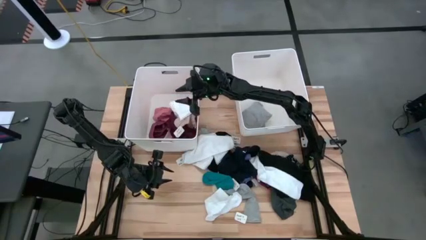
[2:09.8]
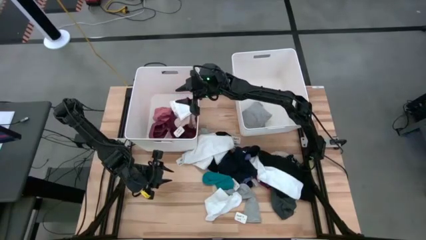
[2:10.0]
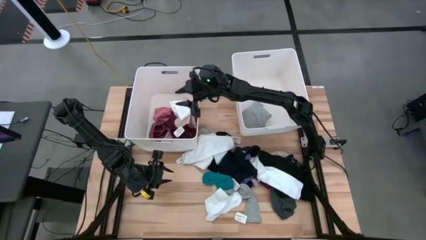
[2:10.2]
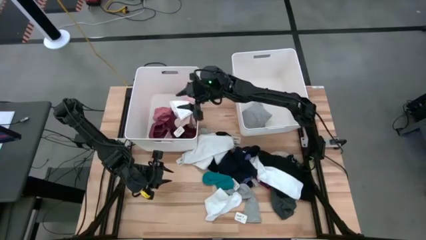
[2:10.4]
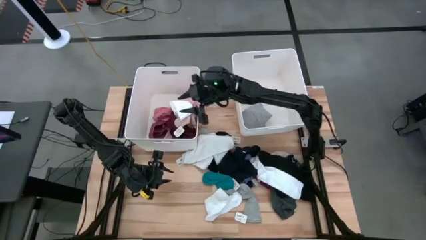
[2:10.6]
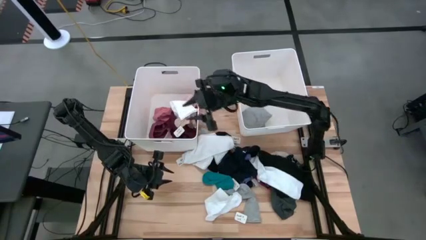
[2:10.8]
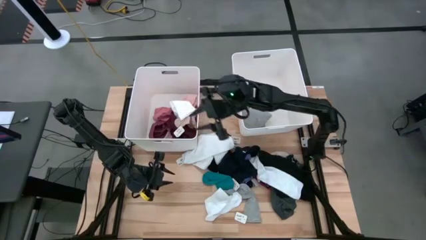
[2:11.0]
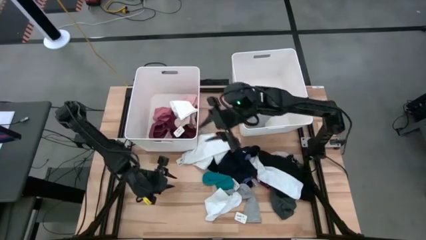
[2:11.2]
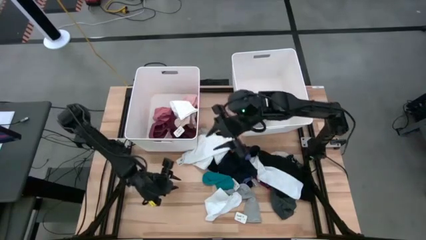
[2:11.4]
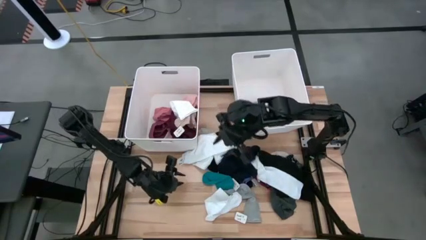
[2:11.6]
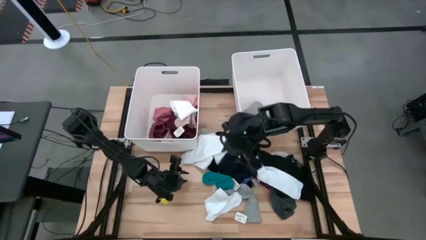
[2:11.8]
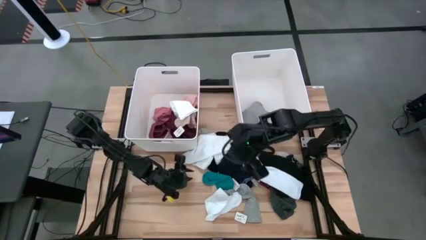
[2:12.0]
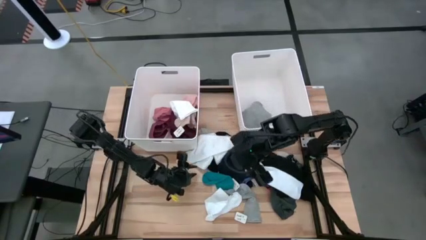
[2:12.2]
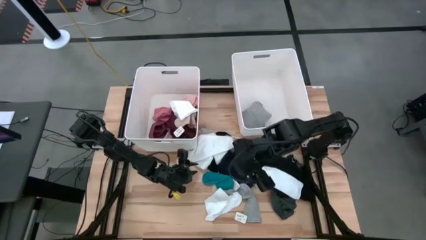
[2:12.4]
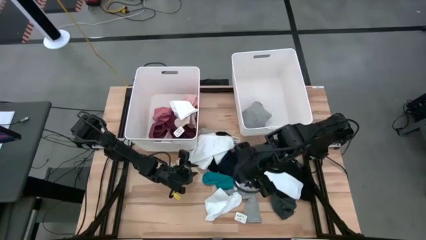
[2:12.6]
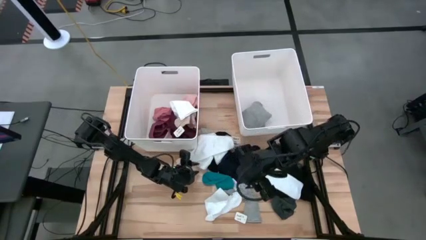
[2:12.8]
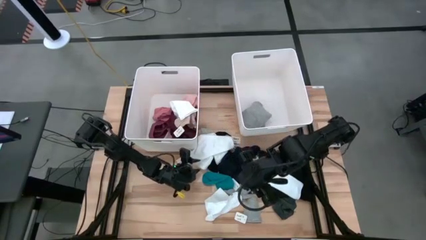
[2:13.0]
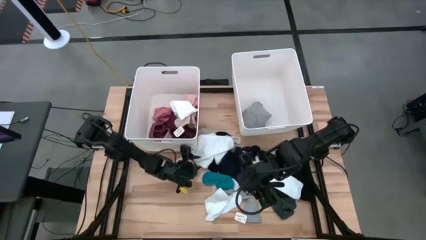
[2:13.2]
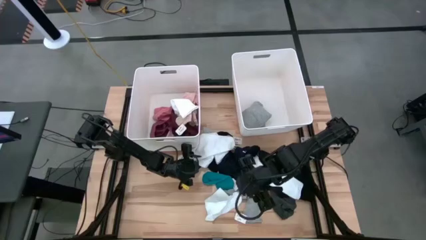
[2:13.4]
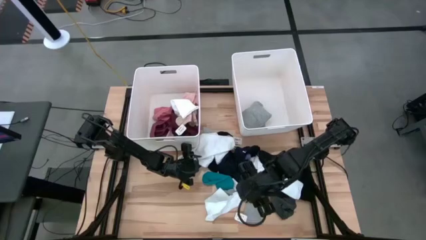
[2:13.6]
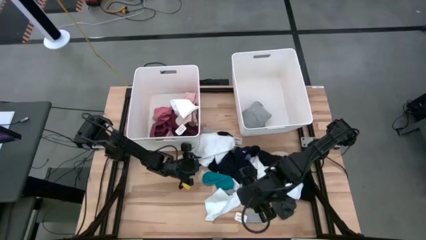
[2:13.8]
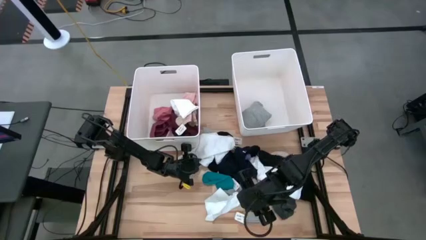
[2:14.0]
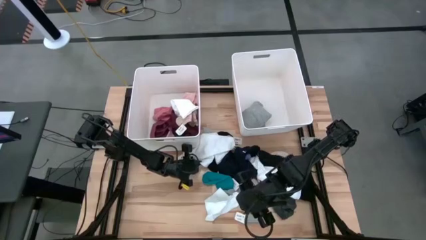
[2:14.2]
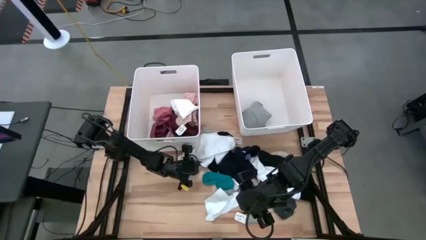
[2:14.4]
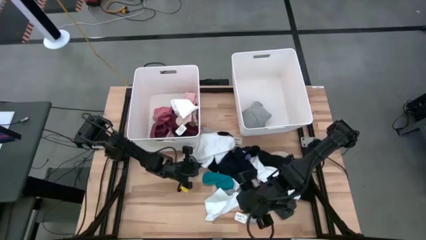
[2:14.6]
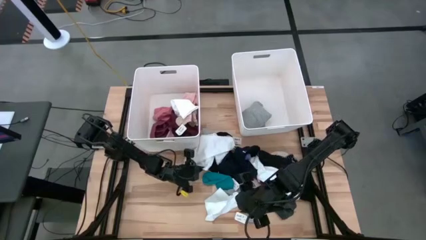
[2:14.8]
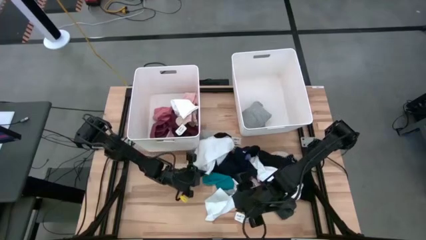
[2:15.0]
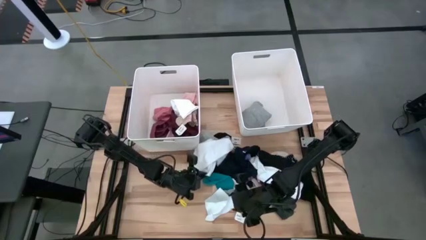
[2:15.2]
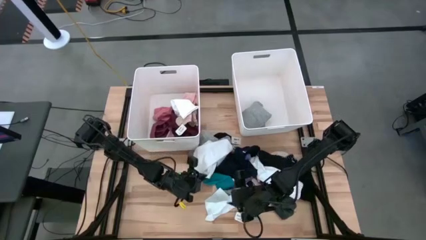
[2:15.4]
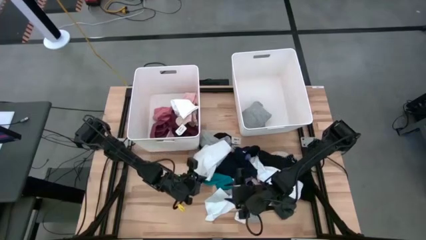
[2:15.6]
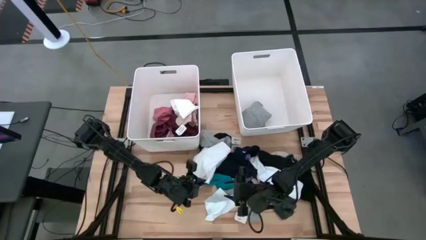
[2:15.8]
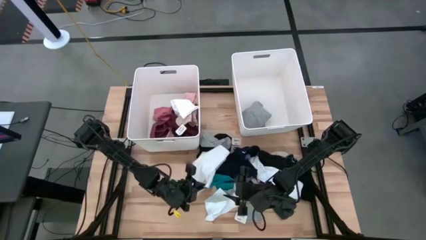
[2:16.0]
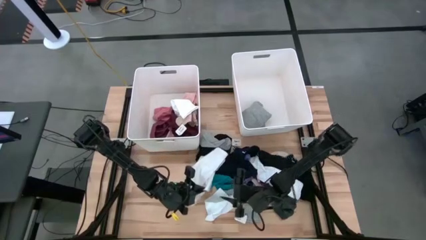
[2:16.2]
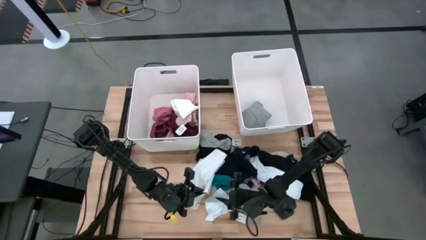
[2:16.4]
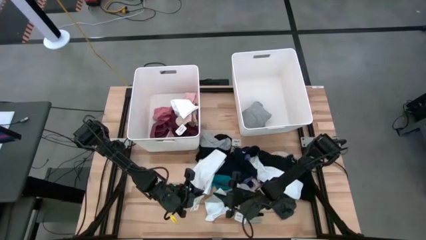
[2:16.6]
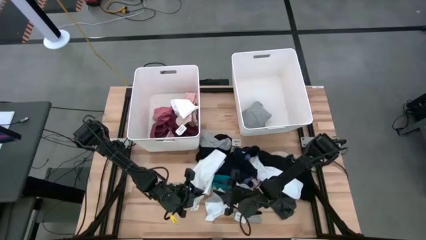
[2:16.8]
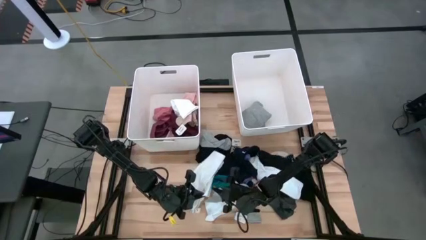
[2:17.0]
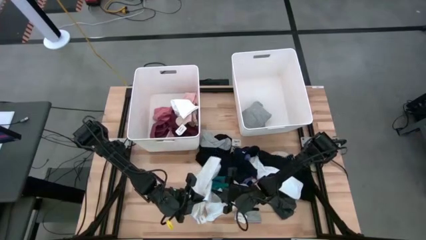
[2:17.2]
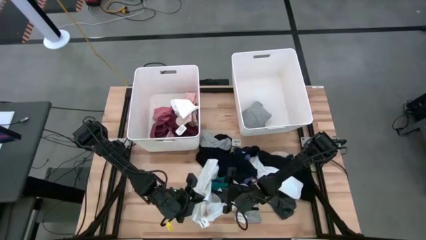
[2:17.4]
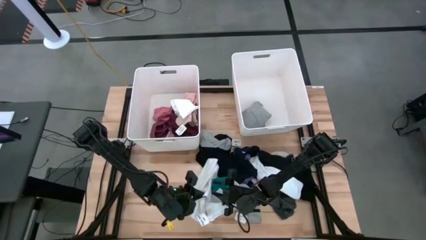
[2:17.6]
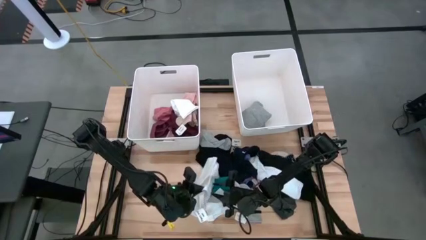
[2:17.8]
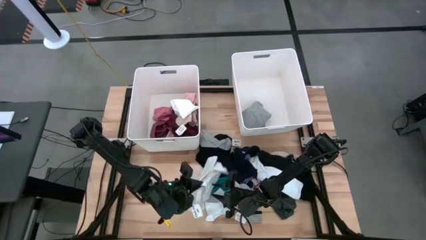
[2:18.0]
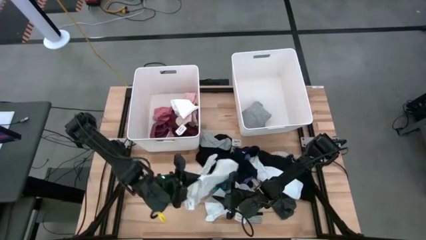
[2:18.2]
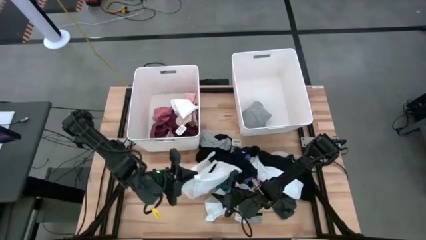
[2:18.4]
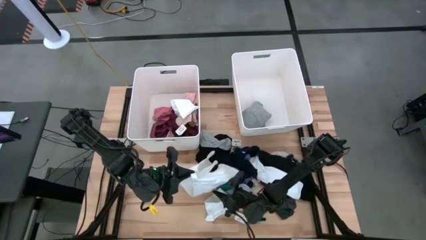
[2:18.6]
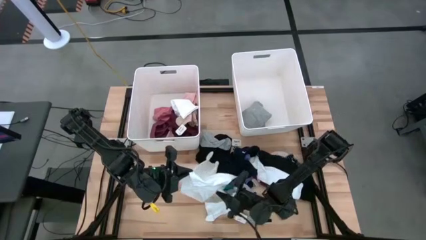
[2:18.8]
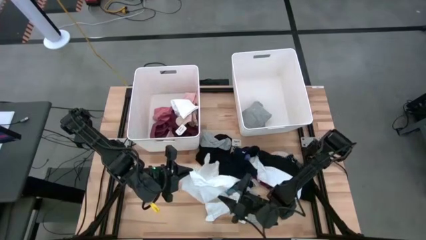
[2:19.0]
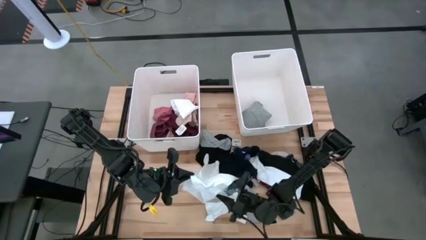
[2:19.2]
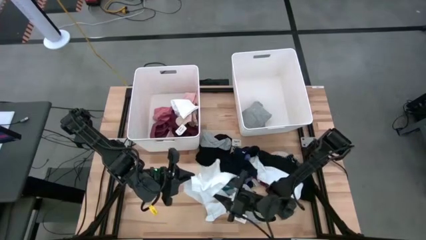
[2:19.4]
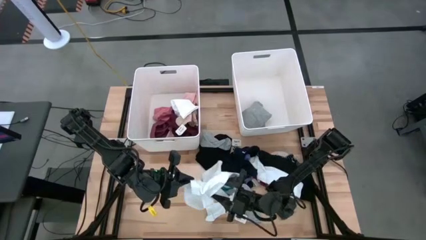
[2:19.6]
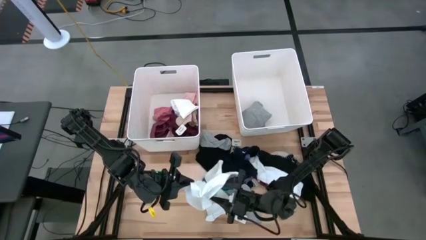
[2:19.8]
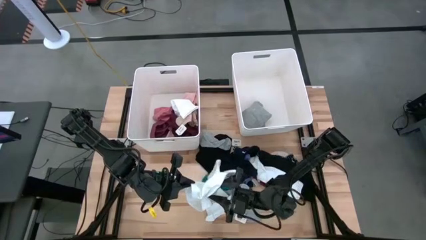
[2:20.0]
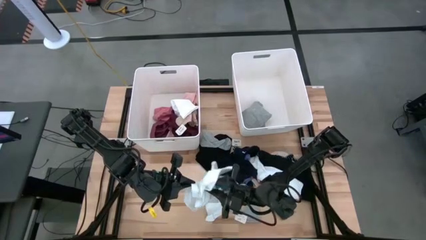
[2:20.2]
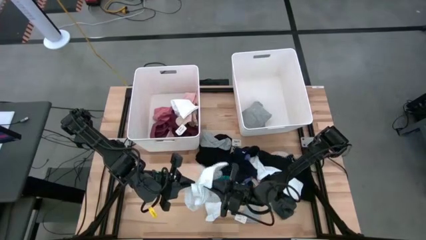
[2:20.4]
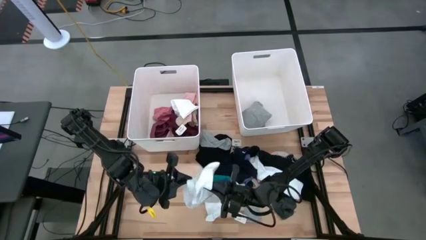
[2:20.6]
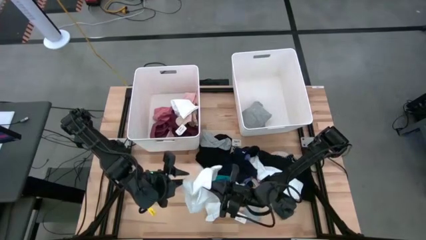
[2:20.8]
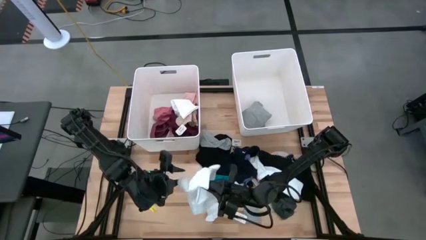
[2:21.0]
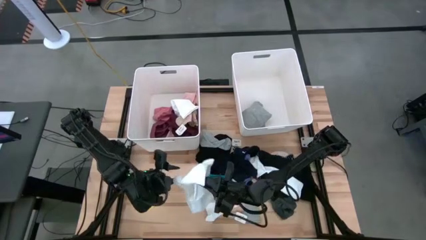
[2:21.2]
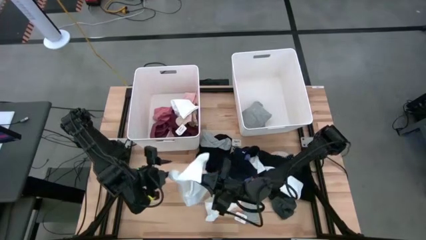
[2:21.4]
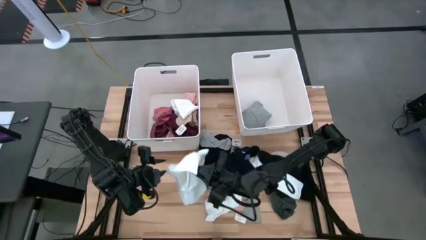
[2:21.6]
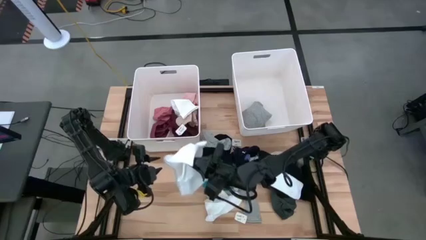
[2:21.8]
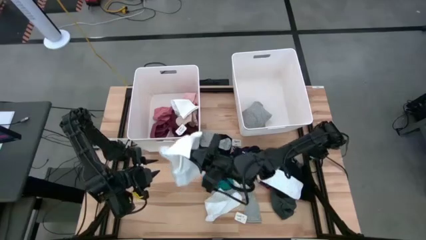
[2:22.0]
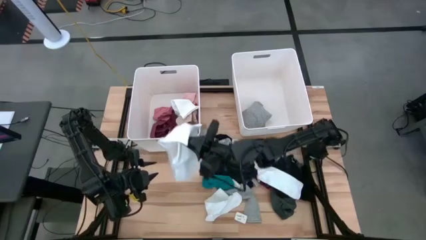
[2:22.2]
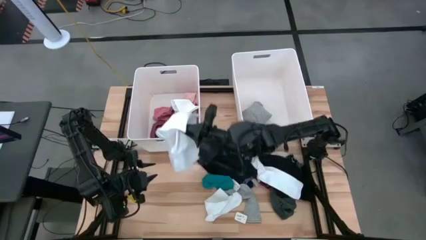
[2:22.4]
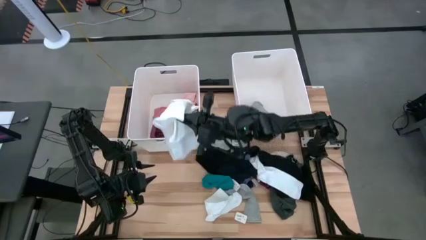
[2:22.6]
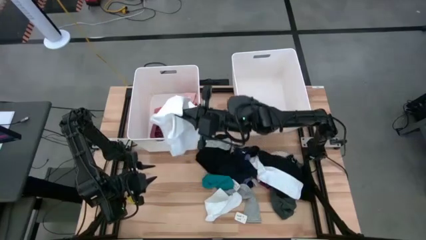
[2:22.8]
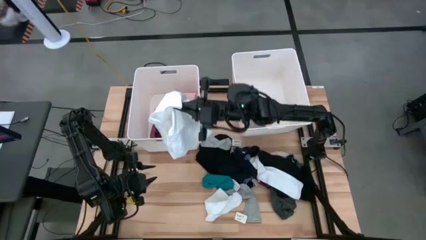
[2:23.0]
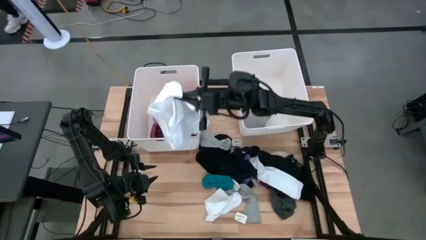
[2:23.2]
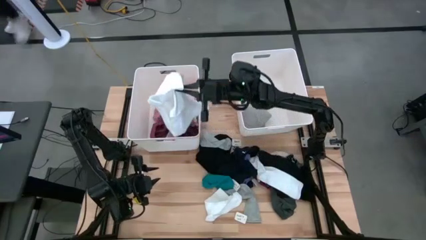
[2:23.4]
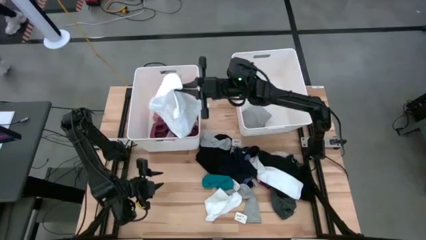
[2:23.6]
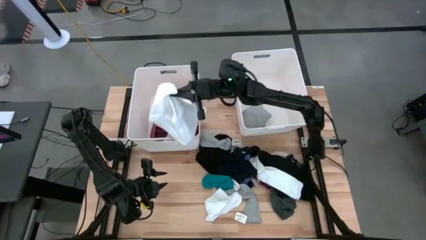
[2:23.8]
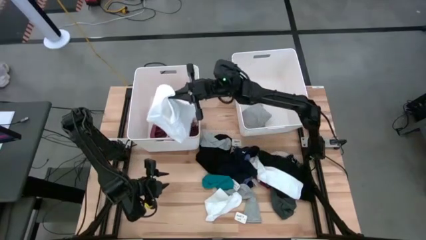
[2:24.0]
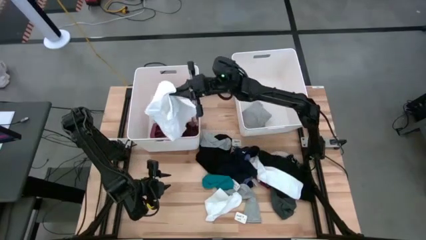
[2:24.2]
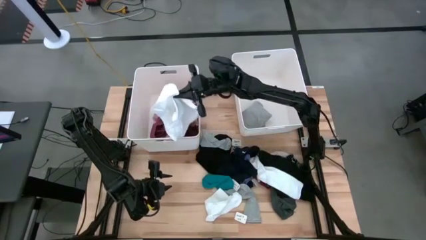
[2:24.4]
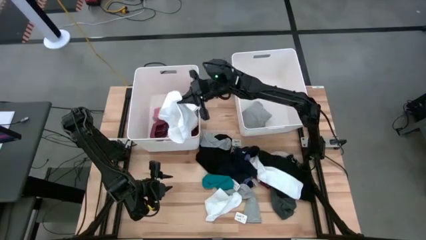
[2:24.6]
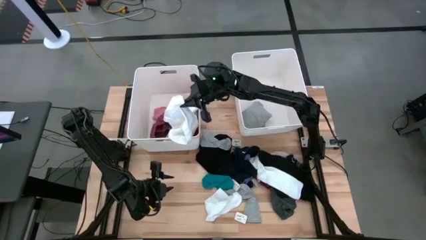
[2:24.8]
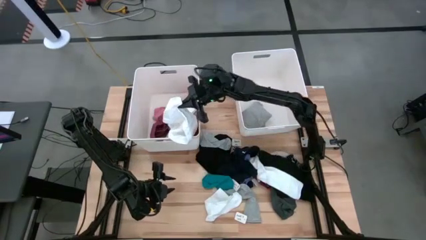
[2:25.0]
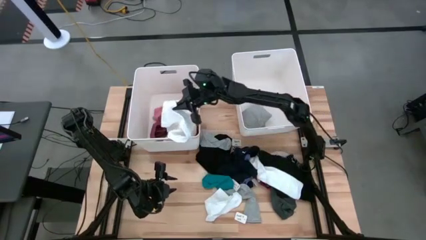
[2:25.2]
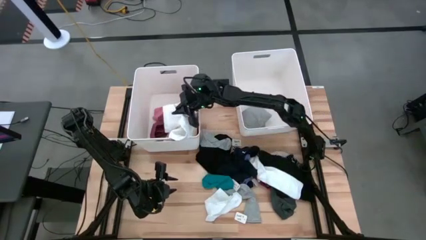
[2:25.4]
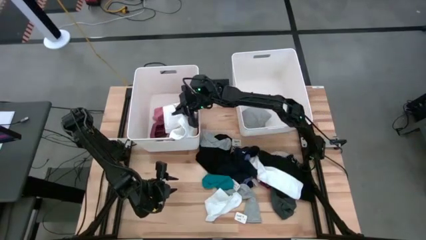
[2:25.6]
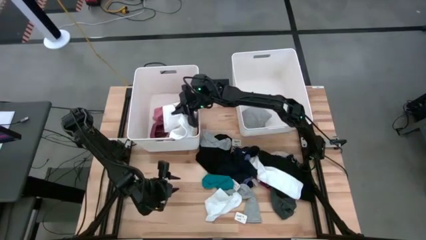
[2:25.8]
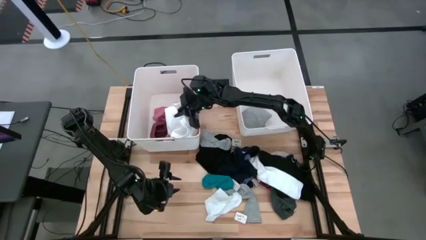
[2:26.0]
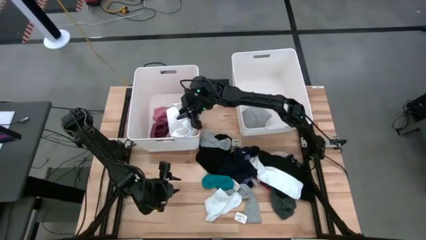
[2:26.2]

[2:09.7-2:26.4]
Task: Sort clothes
Put the white underwear into the left white bin
